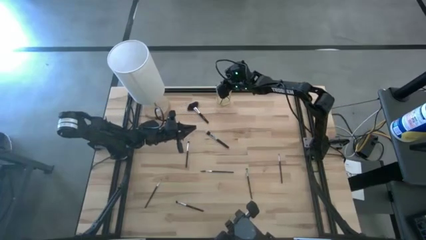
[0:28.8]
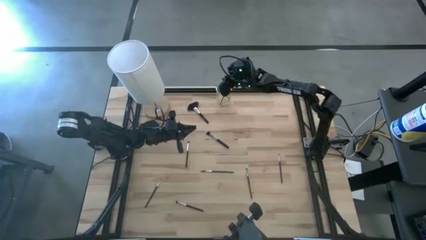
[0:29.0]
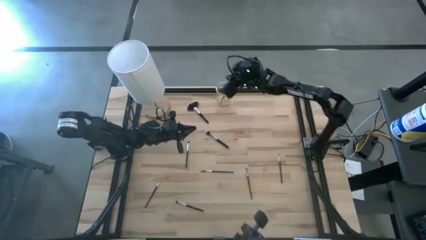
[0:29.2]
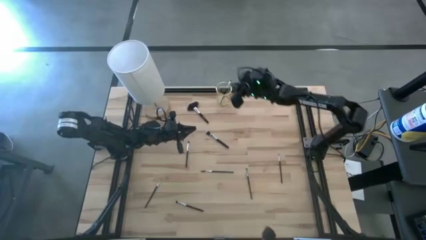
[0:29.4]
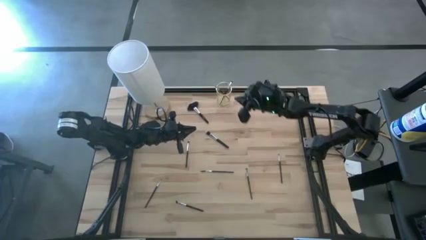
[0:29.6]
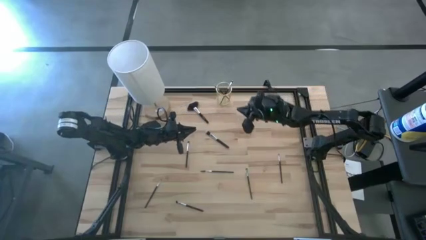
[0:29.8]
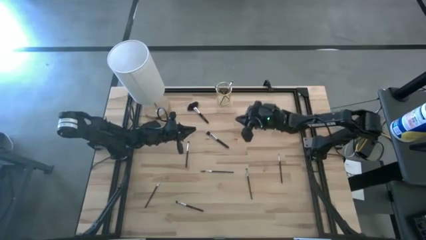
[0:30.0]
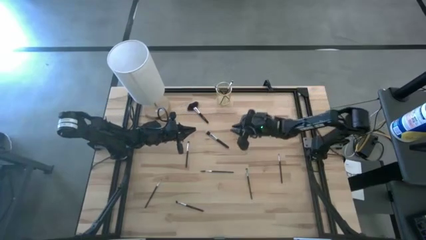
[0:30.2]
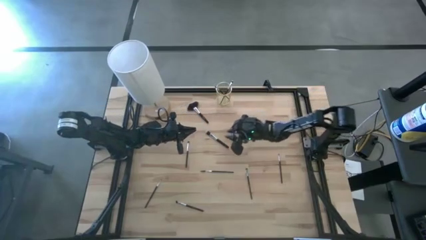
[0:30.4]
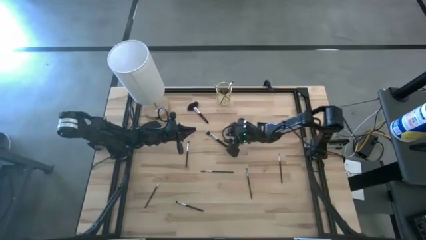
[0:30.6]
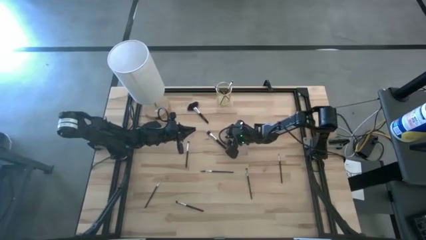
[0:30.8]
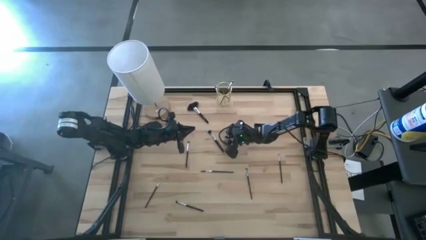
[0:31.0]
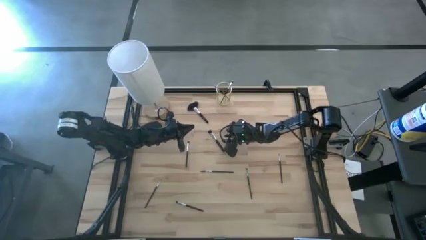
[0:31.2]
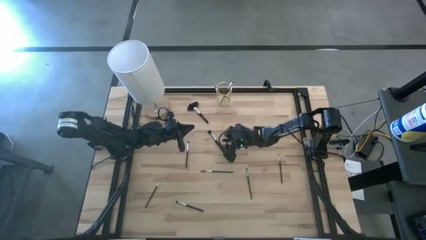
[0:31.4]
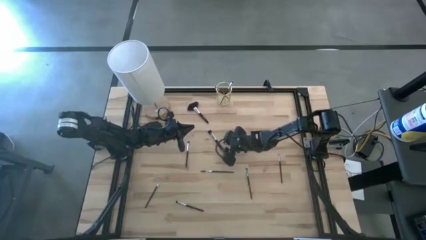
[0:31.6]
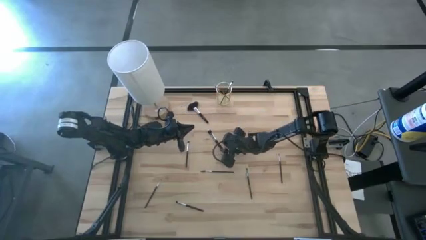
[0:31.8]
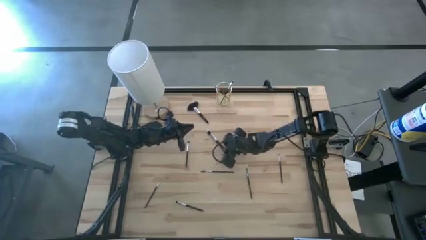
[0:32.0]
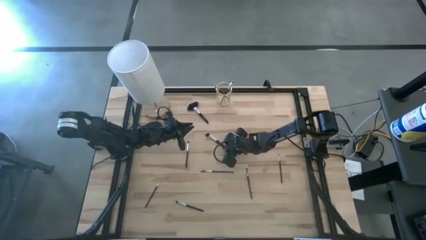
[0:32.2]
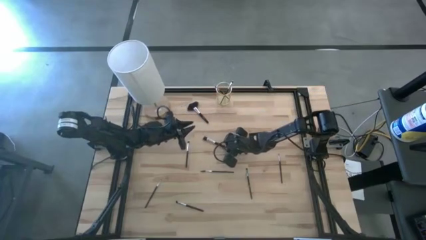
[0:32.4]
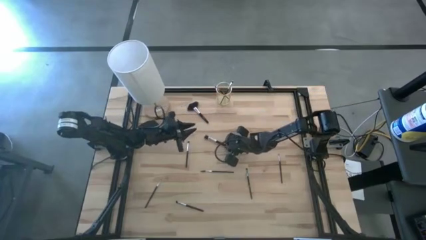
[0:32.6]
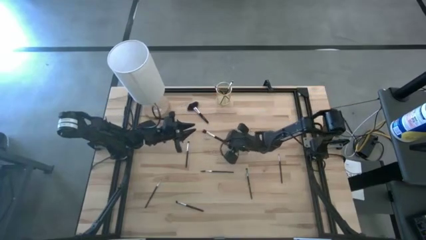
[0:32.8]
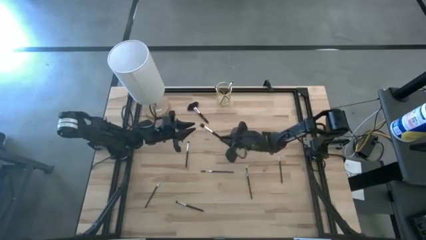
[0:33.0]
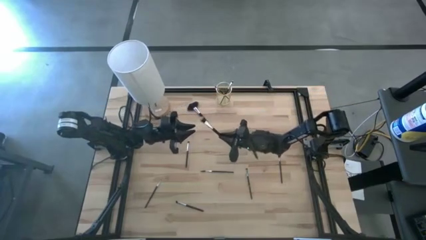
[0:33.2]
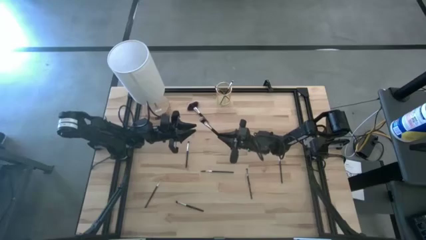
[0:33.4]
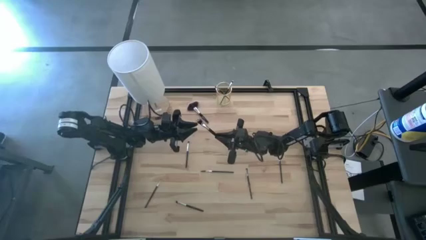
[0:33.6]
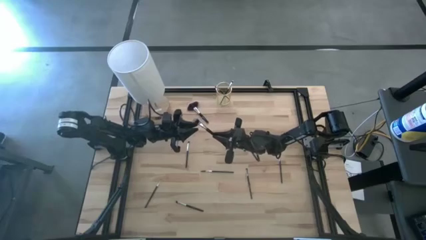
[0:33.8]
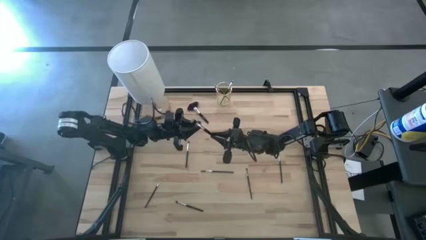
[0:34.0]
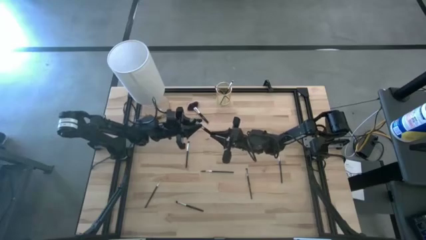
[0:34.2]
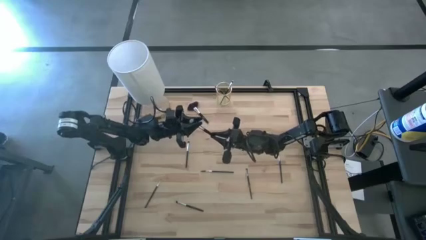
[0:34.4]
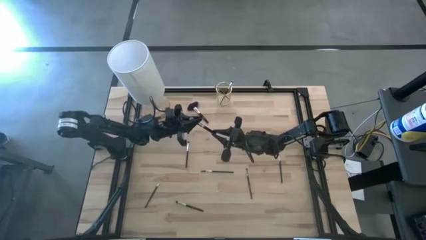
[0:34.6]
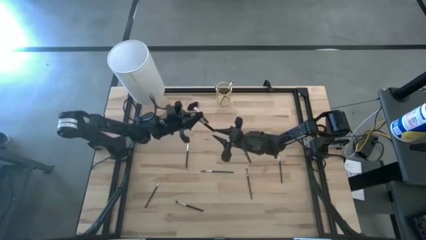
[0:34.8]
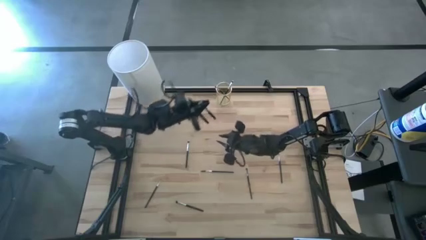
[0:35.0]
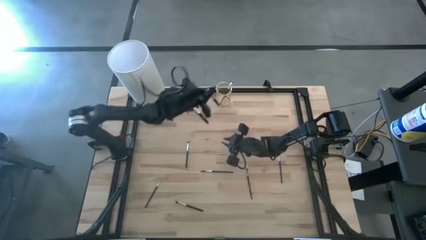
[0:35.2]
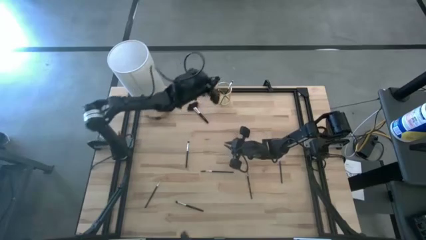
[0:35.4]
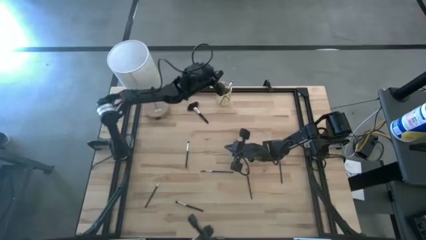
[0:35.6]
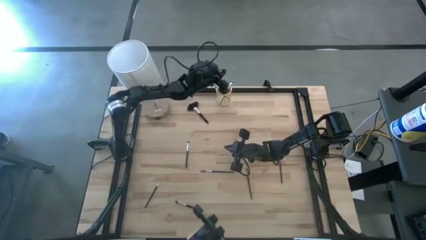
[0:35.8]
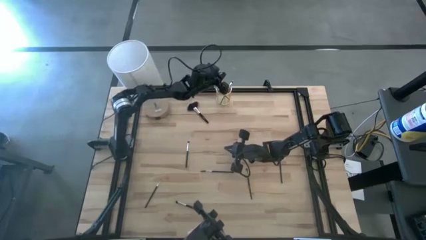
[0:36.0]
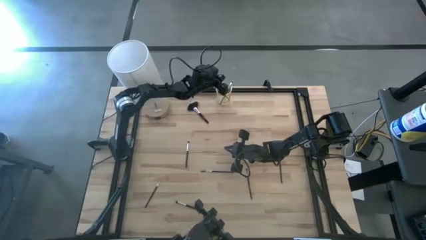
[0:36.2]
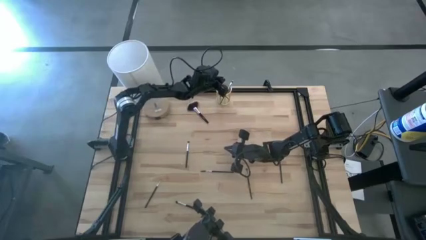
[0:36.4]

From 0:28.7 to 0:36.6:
Task: Put items in baskets/containers
Put the blush brush into the gold container

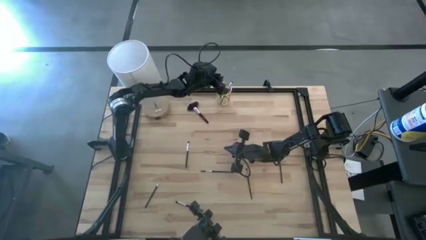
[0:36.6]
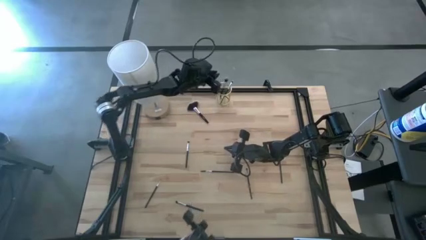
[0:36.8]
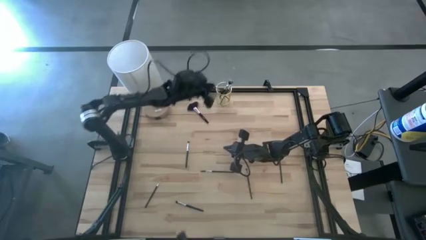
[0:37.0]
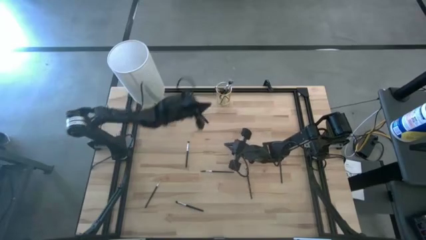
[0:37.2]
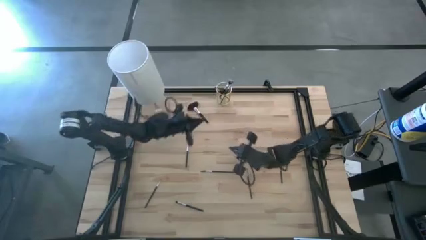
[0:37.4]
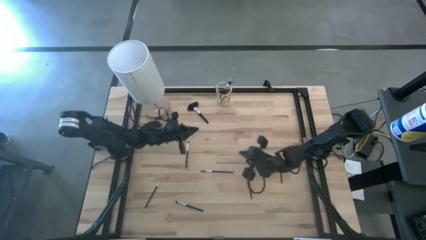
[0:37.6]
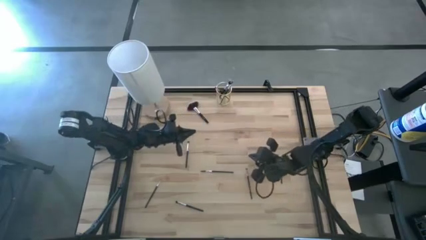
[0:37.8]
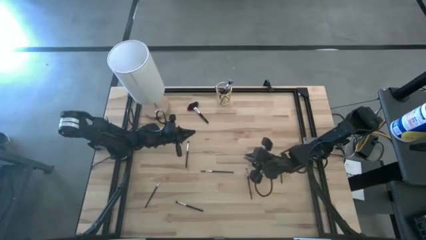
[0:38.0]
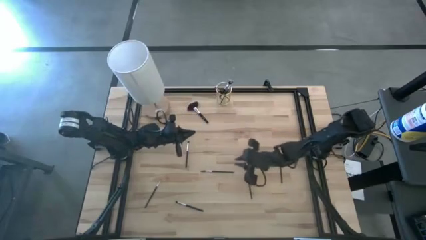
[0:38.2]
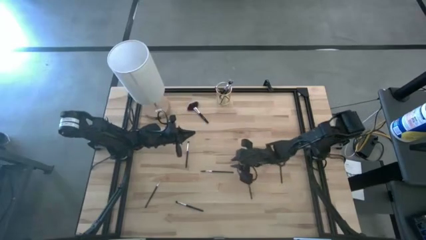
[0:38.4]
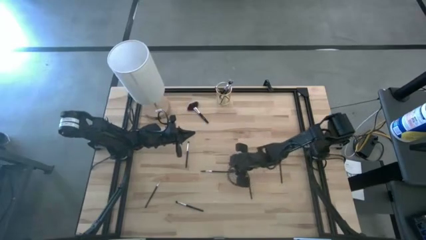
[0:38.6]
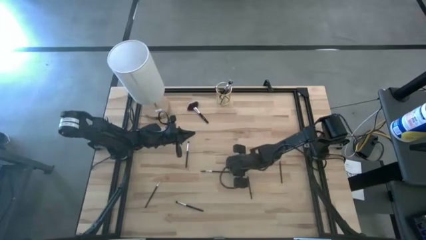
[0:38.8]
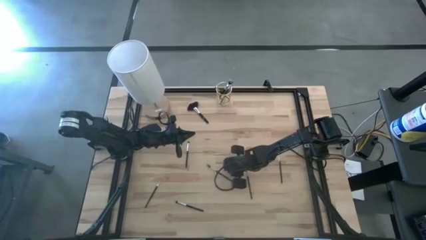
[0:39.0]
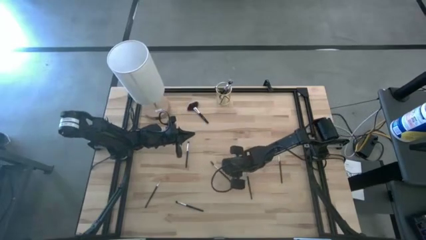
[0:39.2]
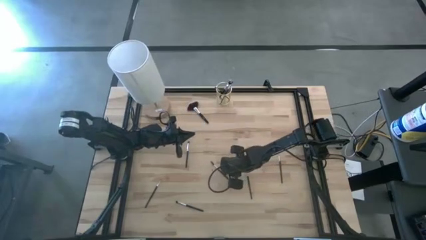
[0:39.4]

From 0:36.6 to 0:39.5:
Put the lash brush into the gold container

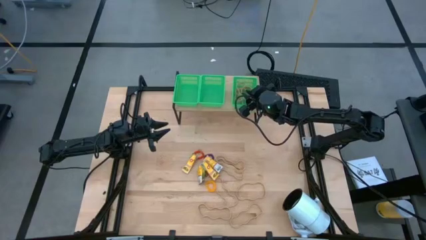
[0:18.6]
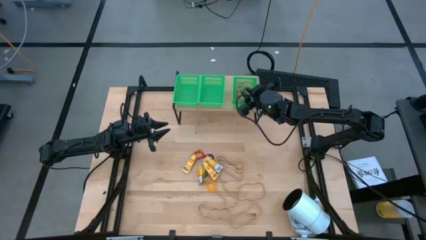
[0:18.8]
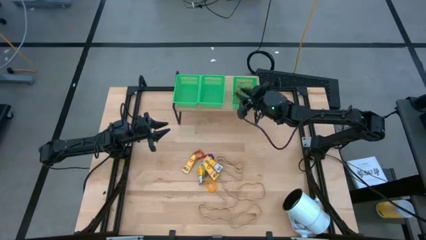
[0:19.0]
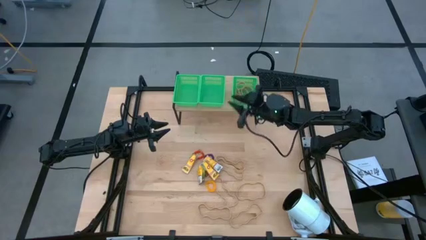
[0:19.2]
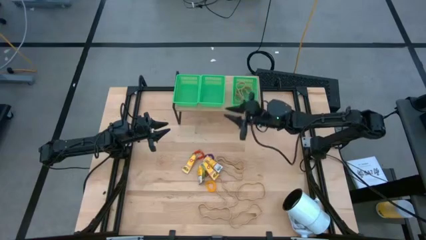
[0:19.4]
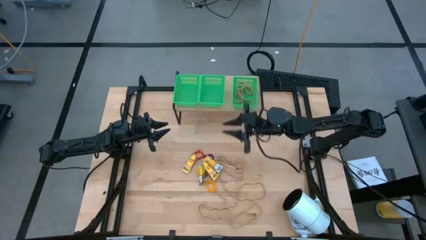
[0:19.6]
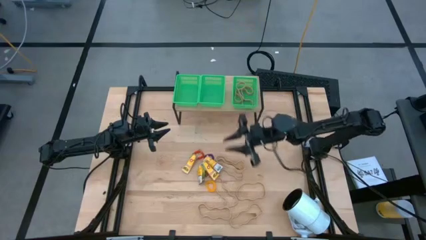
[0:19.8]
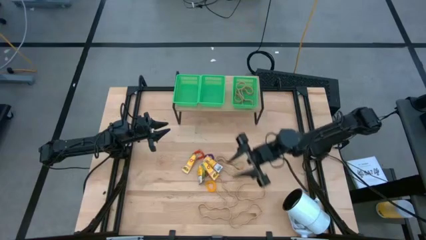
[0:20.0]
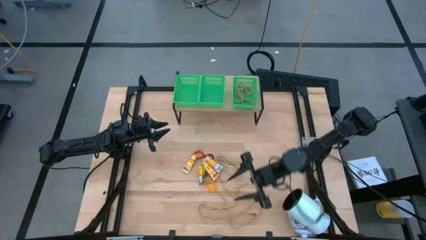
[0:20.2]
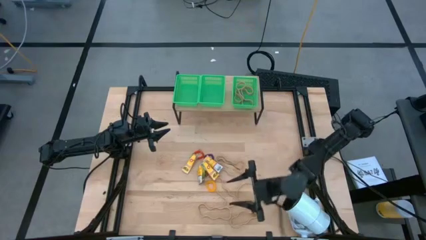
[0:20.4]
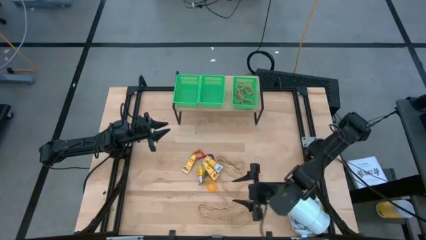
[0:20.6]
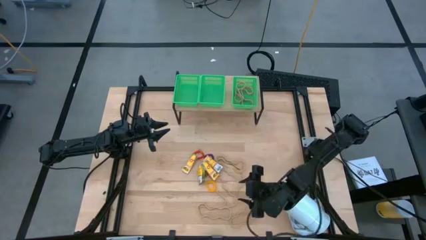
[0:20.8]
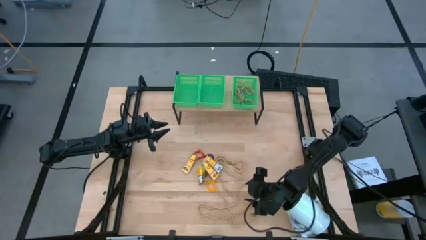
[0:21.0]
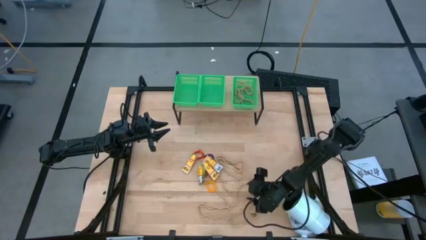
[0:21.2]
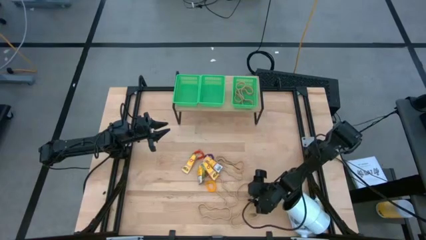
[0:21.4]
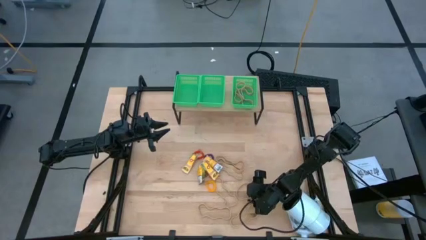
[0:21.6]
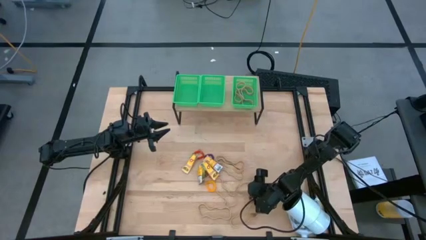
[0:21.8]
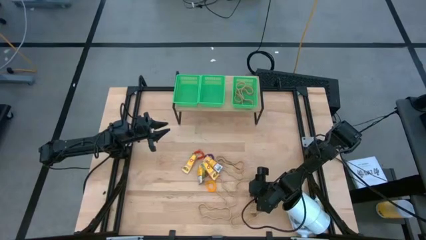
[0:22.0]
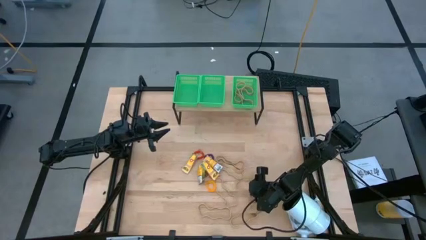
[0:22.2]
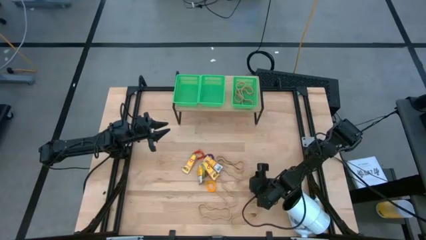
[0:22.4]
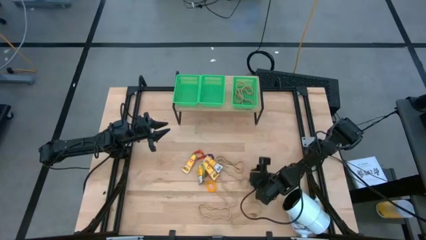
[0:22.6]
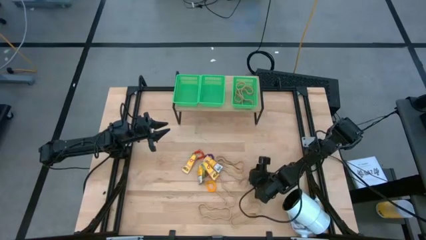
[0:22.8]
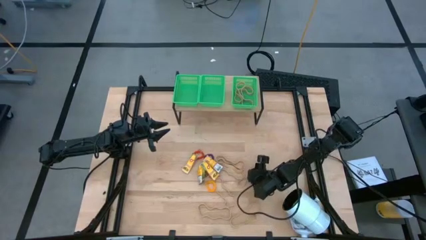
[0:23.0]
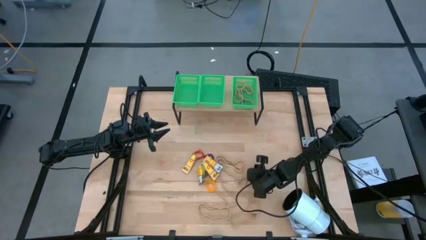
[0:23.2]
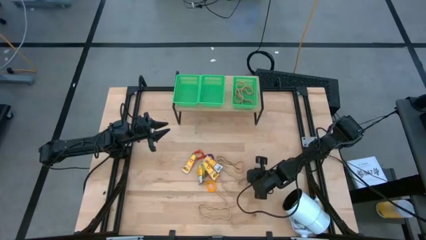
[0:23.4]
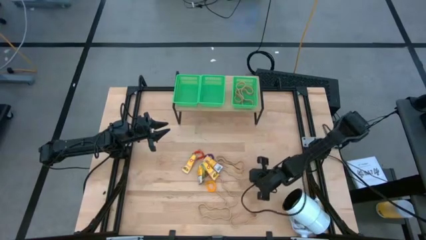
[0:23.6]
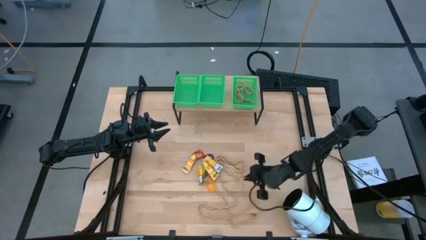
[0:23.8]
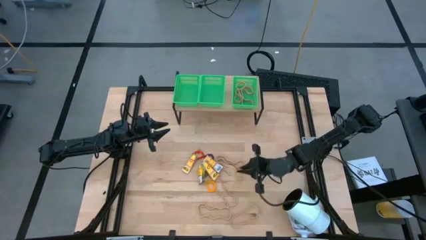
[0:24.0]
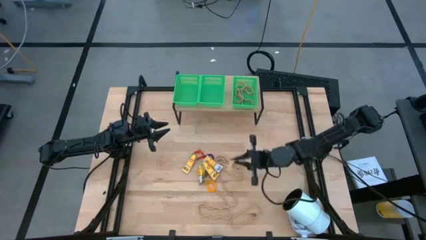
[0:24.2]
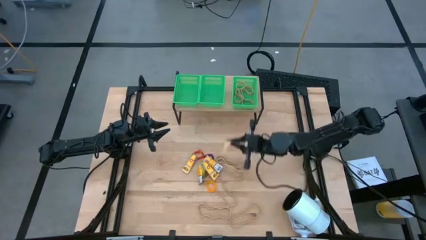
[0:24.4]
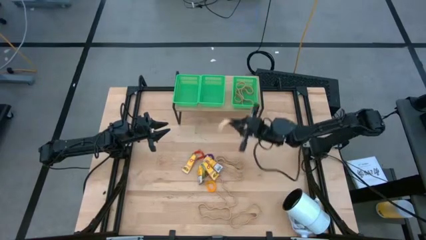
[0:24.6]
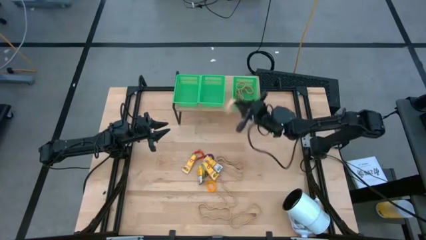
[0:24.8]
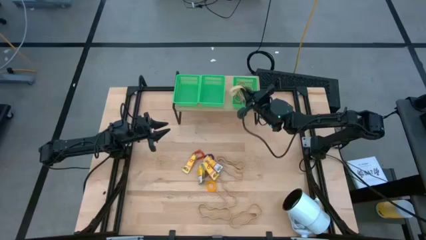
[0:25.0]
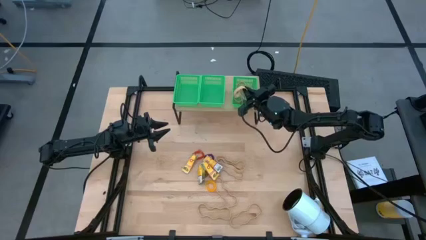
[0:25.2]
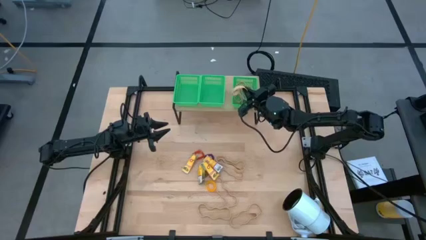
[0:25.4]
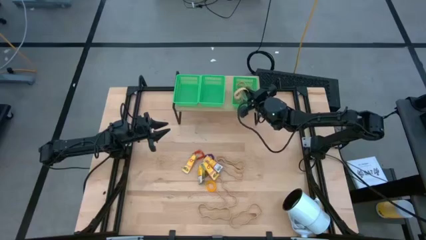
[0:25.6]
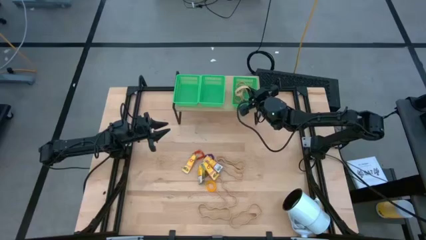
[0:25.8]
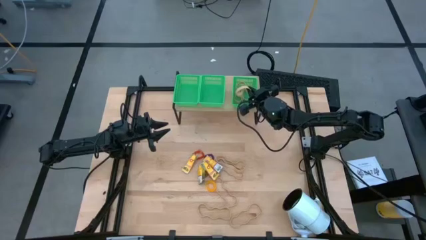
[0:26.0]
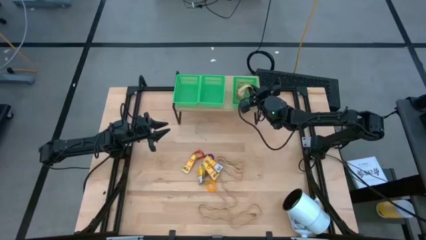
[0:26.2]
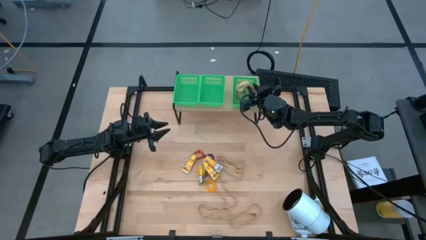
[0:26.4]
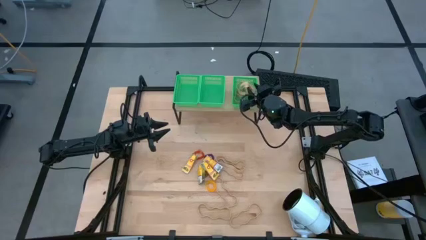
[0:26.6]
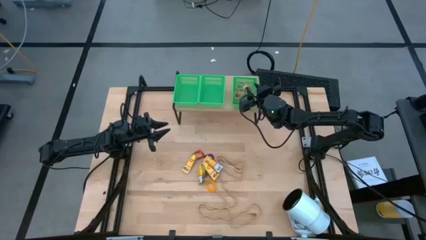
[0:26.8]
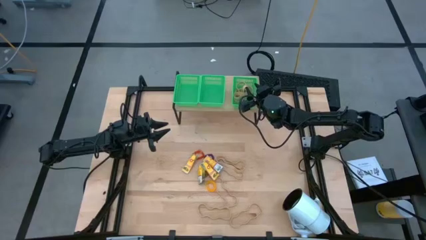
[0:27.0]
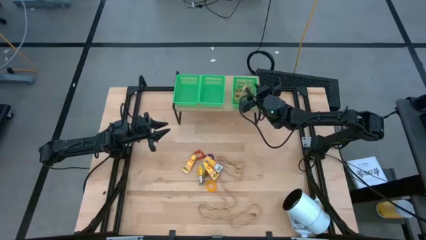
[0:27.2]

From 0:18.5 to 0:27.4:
Task: Pick & Place Office Desk Supplies
Put the brown rubber band into the right green bin on the shelf
